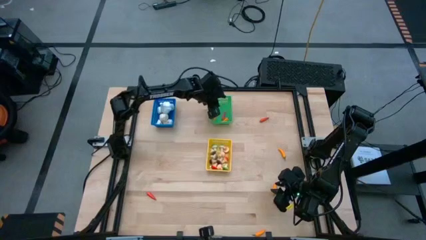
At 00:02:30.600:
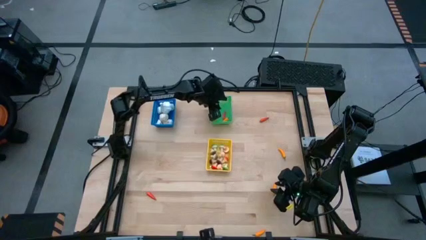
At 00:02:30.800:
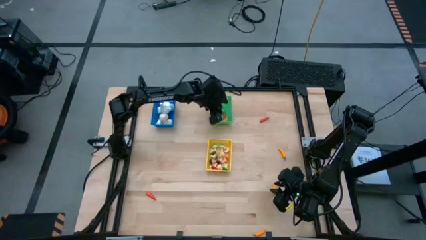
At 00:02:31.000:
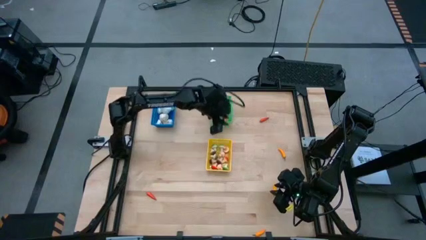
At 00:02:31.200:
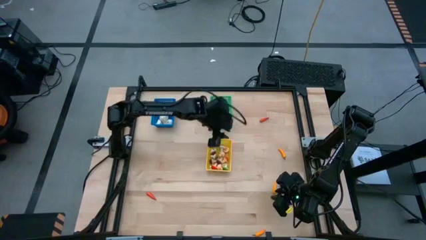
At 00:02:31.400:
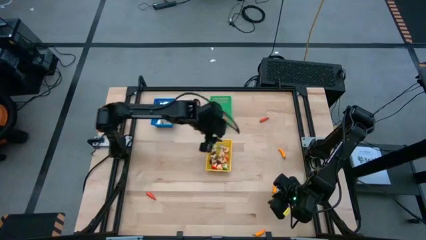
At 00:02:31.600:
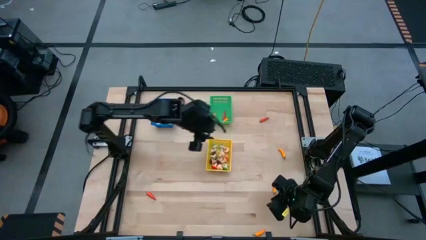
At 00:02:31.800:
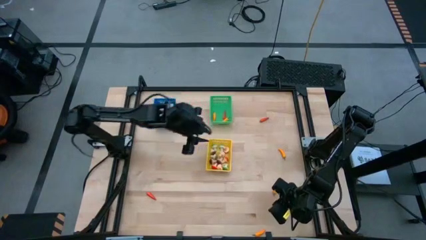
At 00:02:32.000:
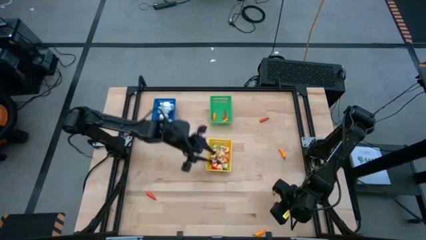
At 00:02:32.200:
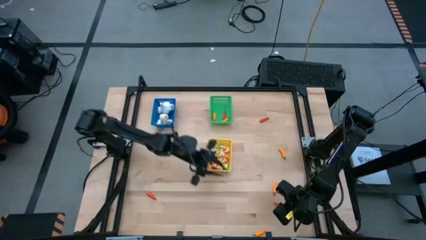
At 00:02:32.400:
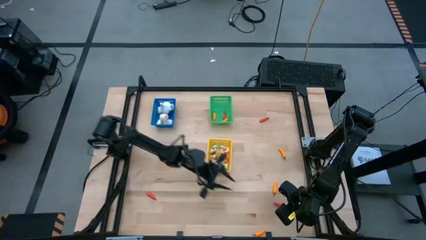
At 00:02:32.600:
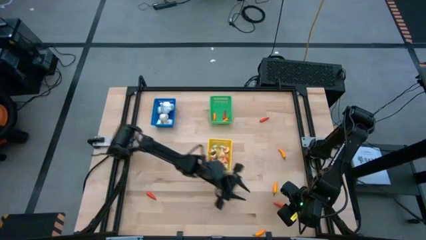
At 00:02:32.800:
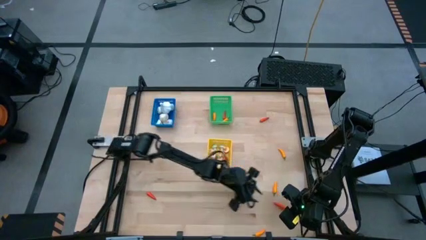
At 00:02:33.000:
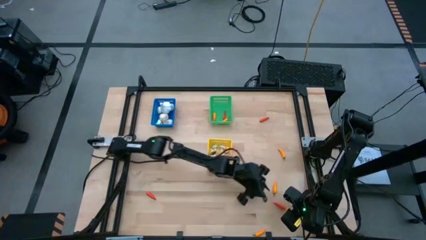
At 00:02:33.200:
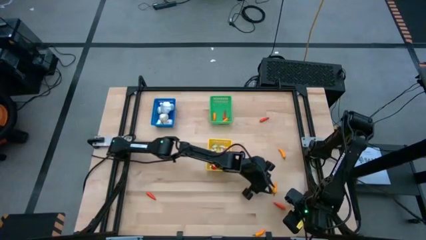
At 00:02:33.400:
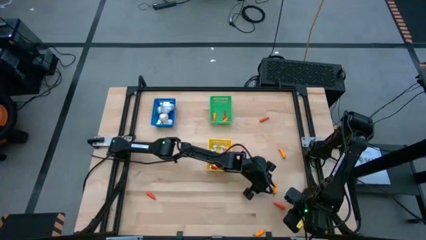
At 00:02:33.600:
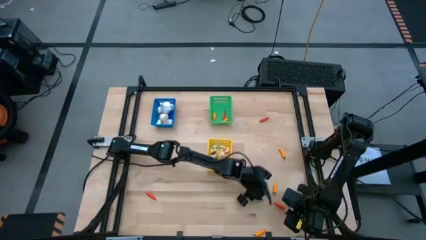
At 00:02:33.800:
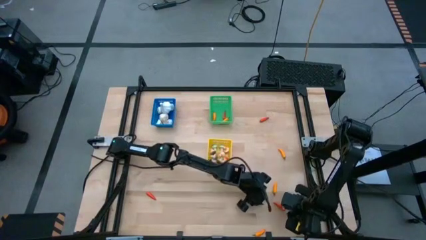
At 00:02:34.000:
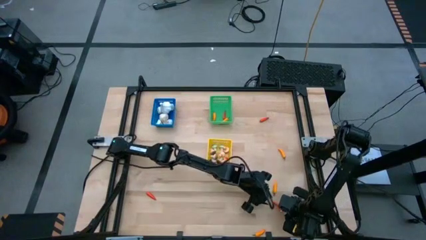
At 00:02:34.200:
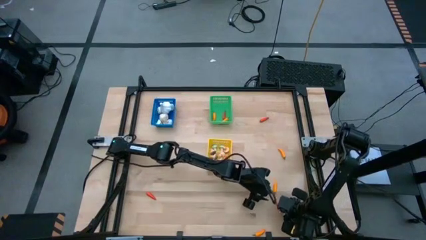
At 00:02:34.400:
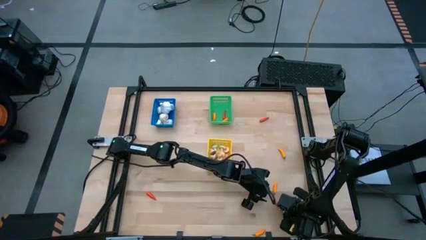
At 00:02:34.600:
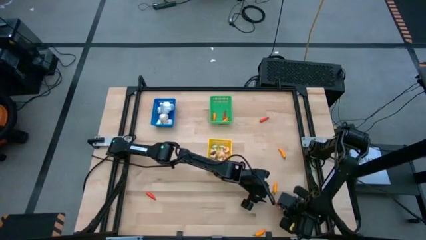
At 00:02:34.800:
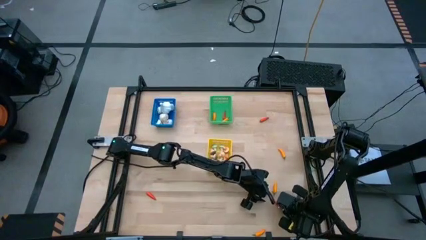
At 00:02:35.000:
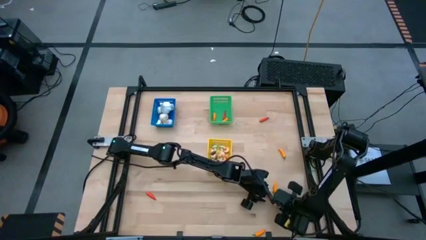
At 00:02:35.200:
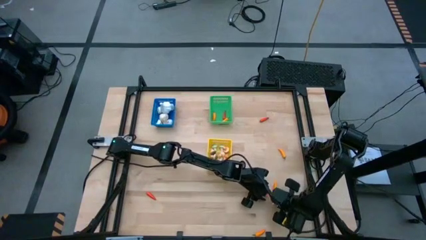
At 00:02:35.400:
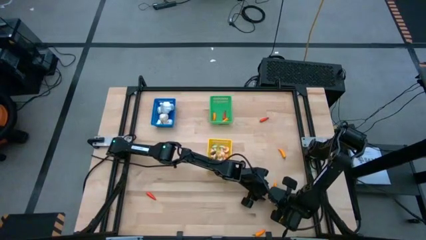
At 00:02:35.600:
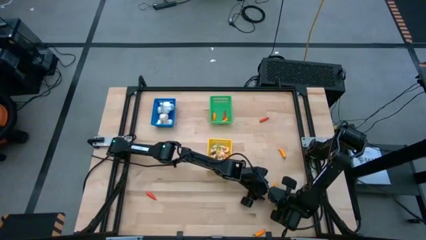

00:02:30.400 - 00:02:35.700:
Task: Sort produce into baskets
Put the red chili pepper into the green bin

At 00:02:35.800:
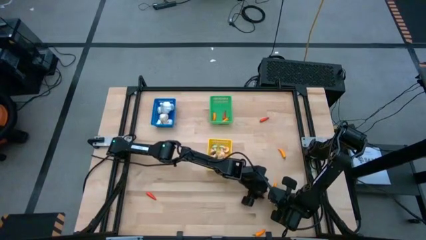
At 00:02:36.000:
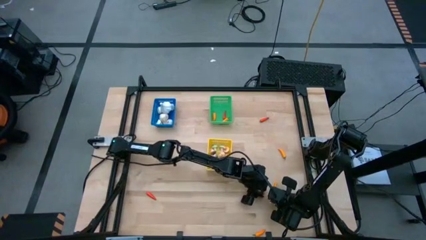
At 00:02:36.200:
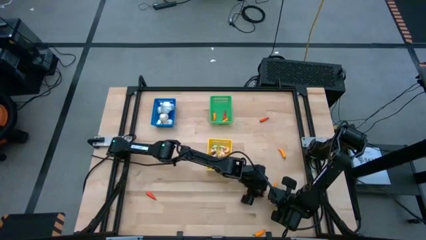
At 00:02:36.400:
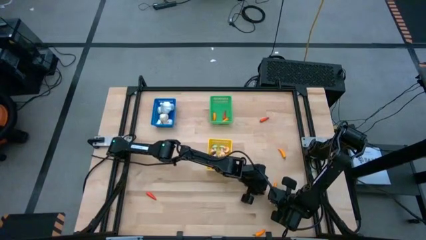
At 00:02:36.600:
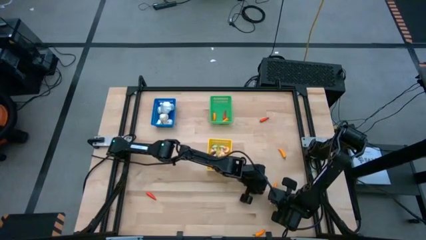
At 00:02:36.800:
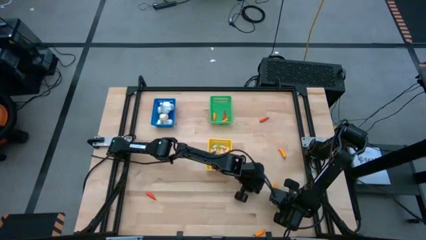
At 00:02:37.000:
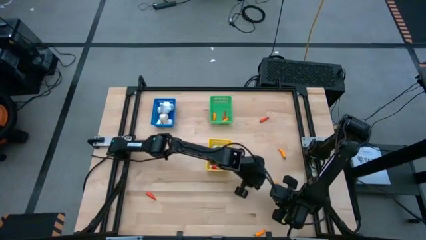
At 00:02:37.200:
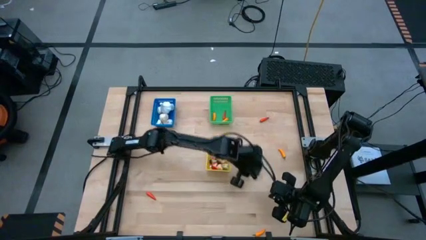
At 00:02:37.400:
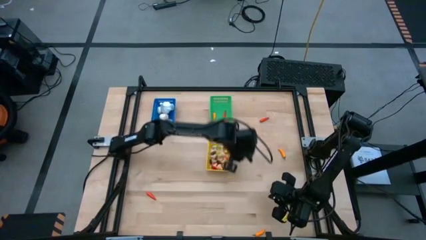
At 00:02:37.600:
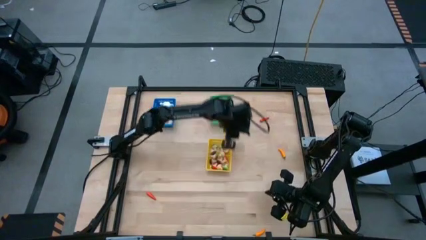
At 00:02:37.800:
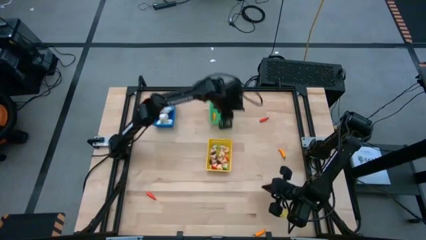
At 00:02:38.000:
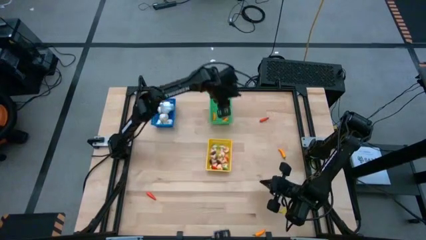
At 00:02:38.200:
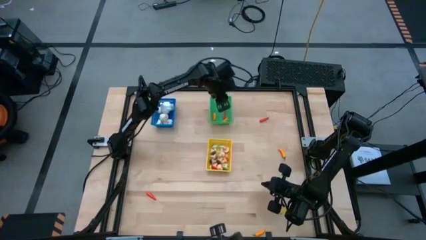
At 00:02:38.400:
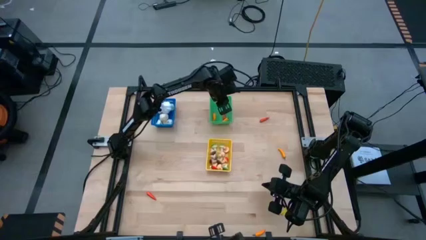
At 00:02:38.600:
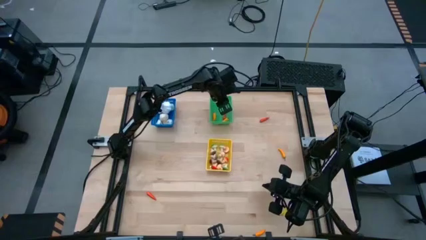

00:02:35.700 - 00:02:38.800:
Put the red chili pepper into the green bin

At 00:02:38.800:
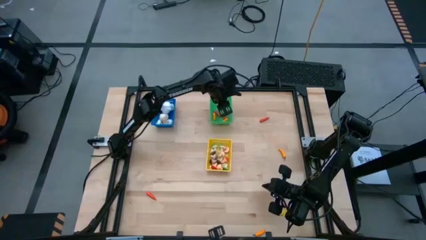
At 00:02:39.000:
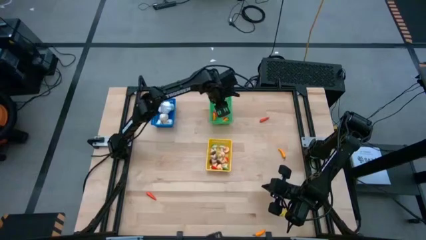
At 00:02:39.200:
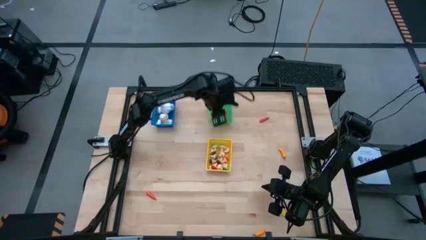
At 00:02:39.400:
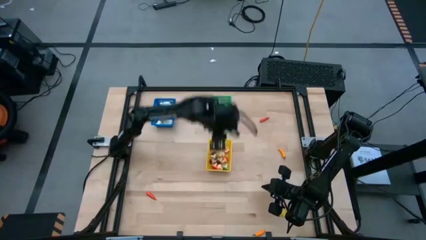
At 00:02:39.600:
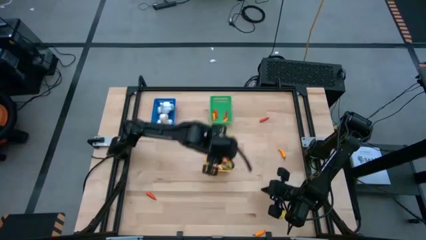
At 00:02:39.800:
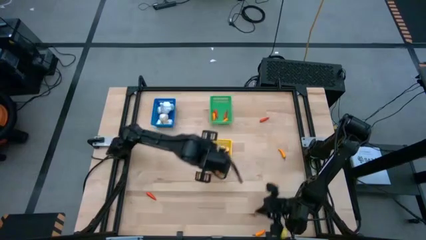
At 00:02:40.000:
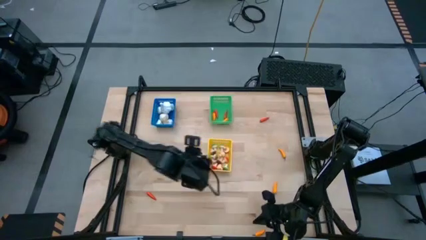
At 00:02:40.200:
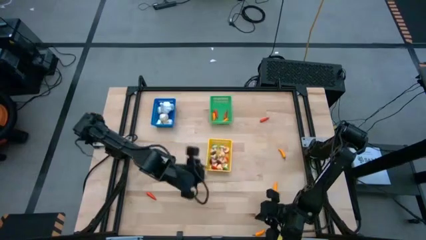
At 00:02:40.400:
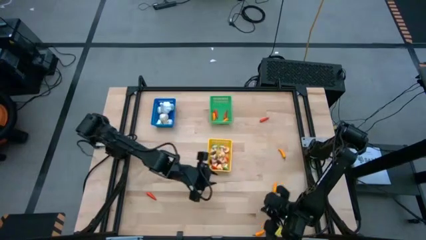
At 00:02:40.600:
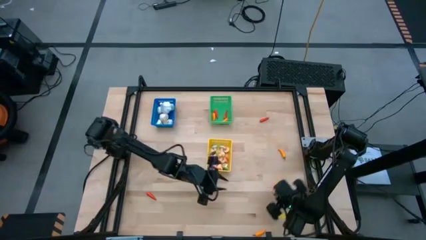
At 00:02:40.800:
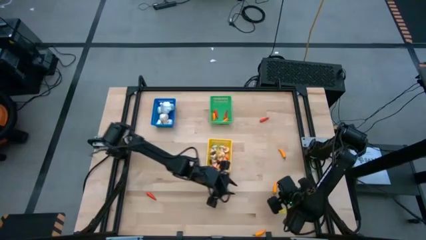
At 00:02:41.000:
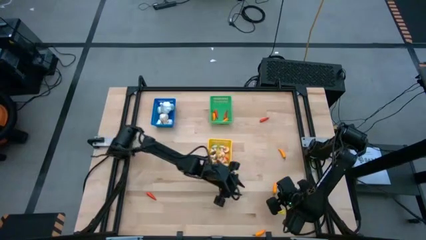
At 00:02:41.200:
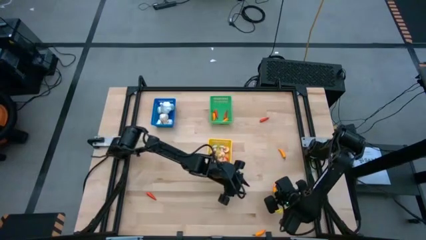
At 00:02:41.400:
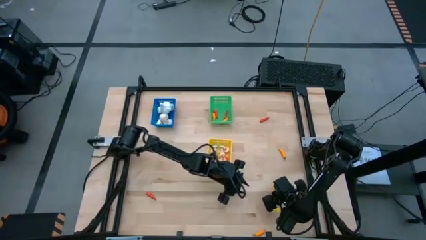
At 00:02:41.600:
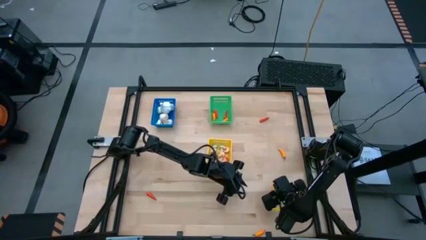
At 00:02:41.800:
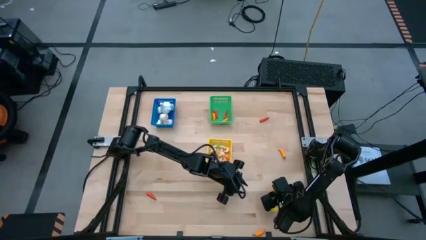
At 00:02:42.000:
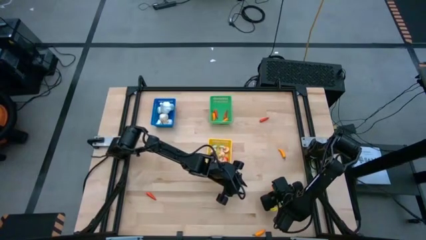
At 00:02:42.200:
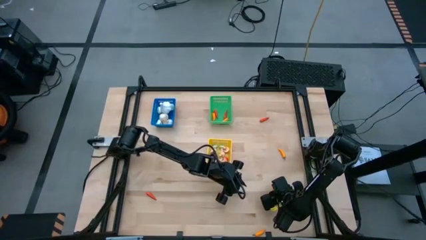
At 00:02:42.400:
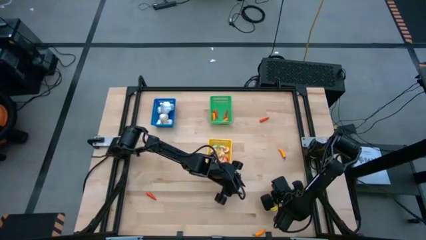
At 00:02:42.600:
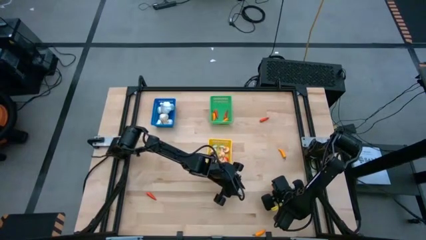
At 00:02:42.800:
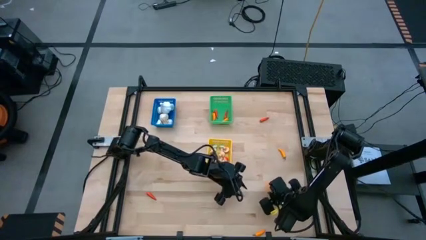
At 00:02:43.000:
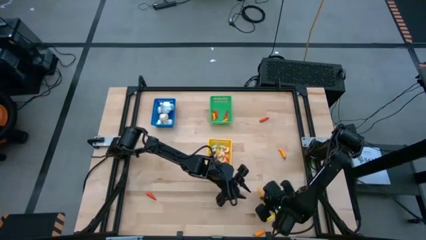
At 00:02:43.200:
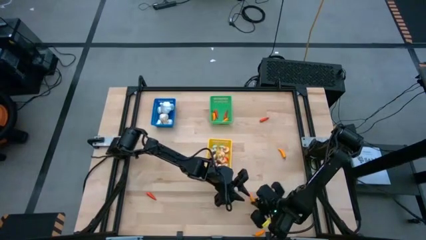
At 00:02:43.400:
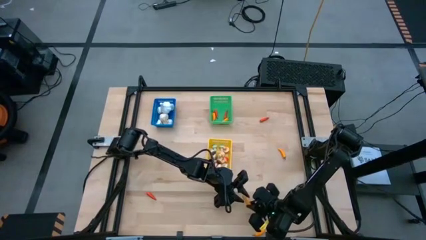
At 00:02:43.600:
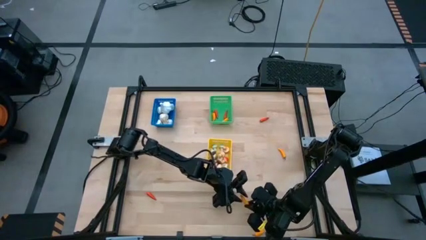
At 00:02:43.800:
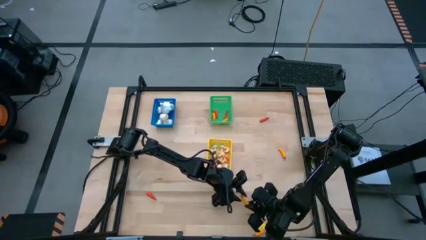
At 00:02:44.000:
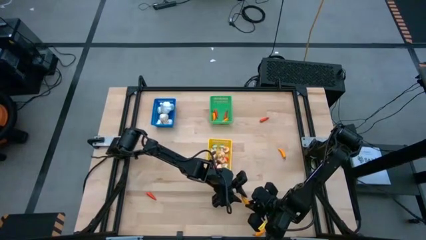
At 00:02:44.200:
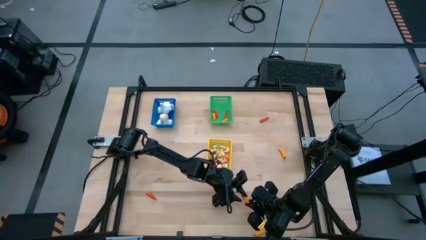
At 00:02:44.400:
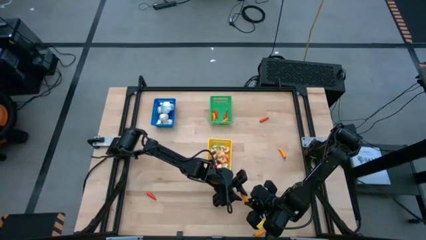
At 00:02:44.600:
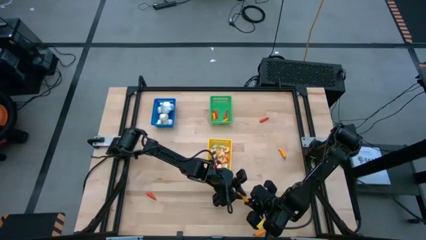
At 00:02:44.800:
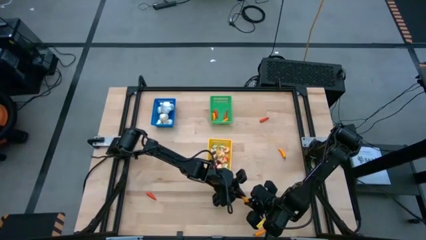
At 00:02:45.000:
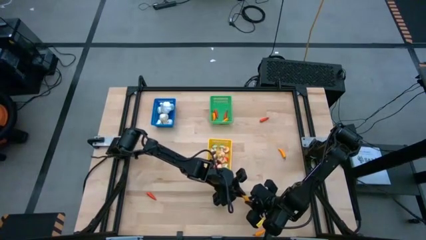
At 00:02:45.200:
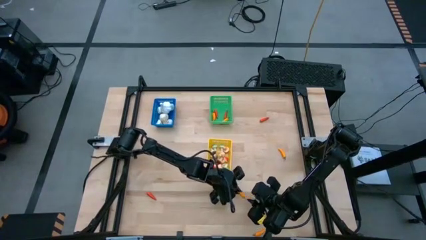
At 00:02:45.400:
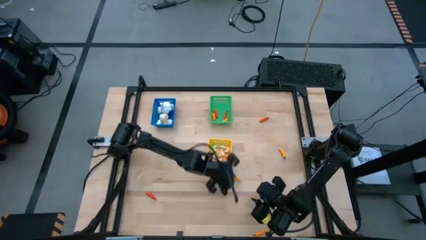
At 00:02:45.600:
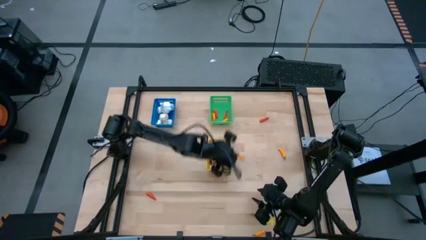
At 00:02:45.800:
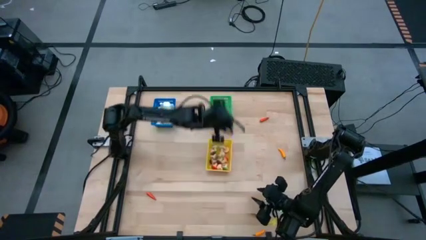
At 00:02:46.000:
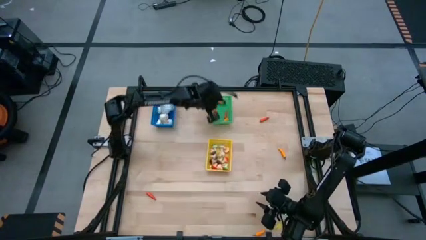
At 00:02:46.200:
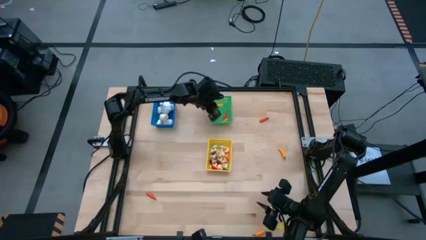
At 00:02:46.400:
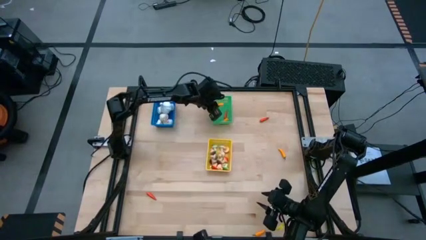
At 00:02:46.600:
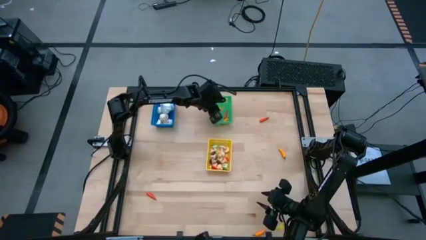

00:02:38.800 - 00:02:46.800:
Put the orange chili pepper into the green bin
